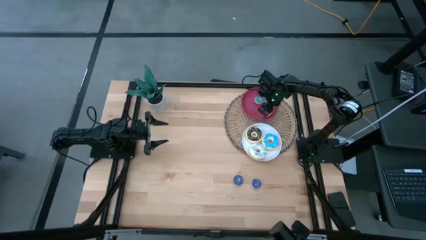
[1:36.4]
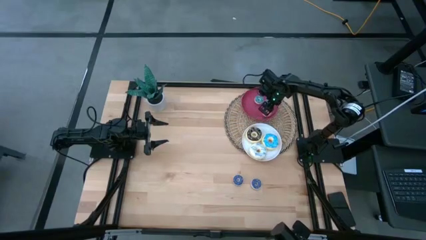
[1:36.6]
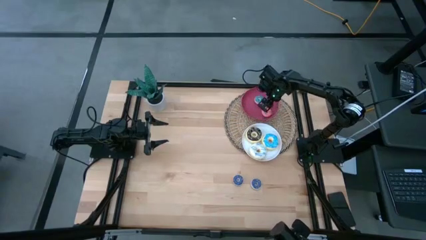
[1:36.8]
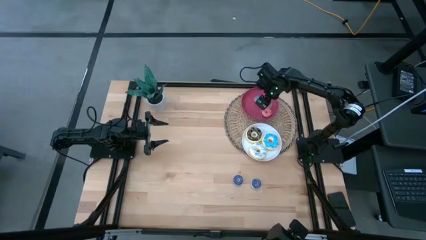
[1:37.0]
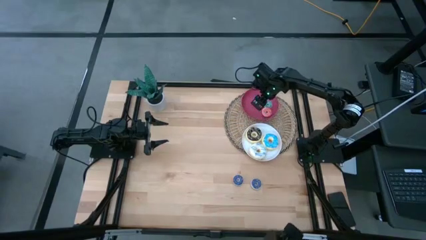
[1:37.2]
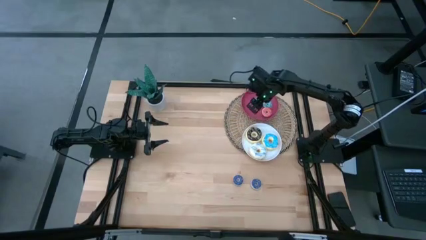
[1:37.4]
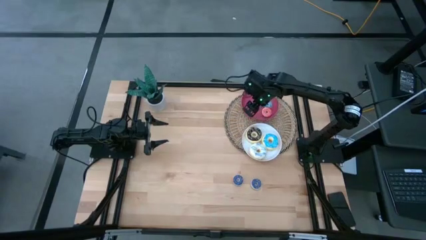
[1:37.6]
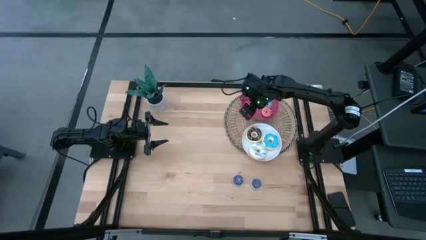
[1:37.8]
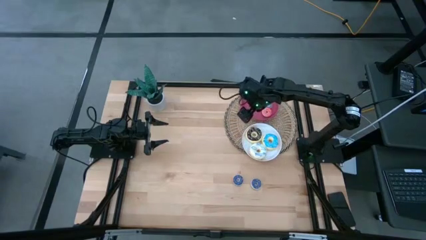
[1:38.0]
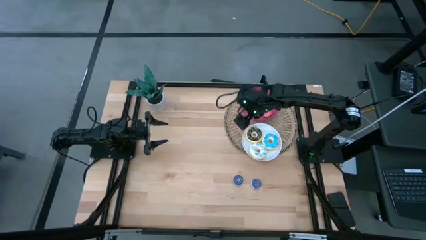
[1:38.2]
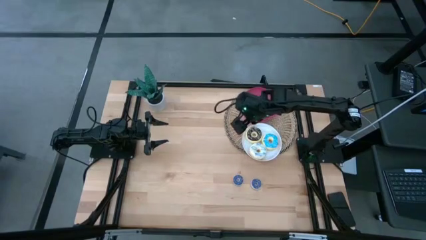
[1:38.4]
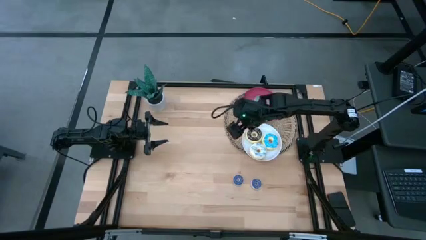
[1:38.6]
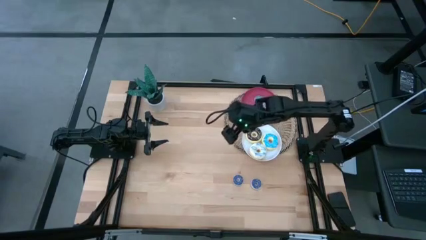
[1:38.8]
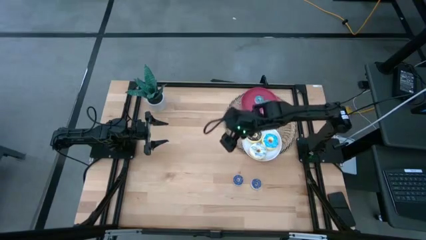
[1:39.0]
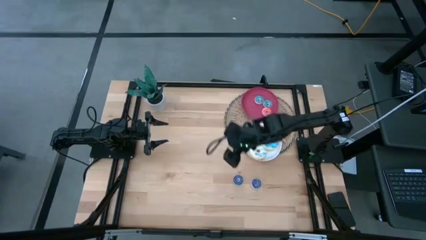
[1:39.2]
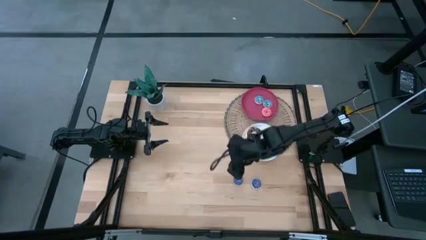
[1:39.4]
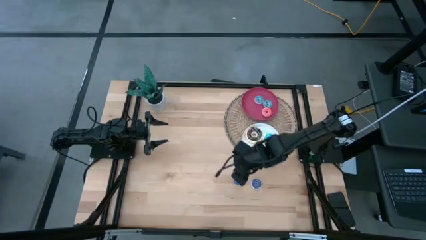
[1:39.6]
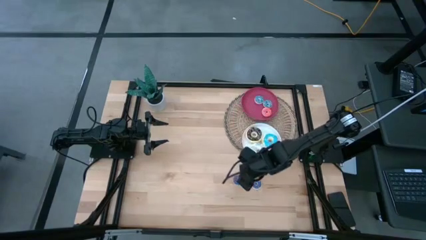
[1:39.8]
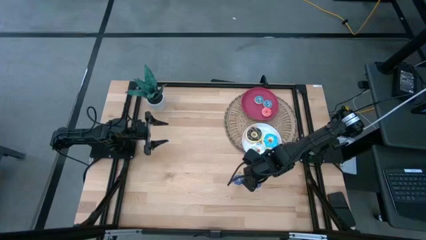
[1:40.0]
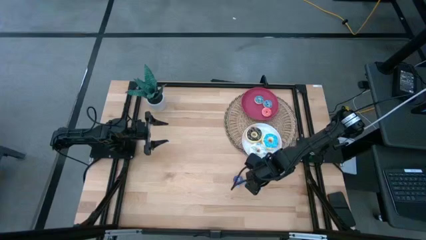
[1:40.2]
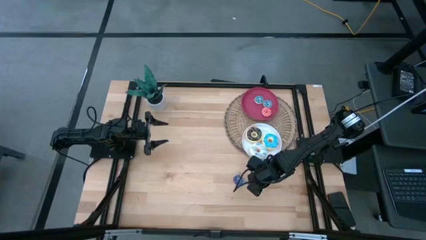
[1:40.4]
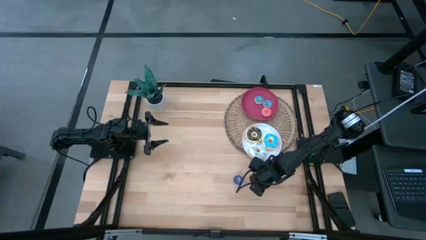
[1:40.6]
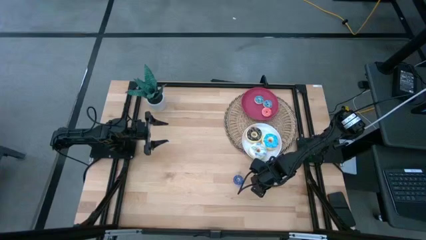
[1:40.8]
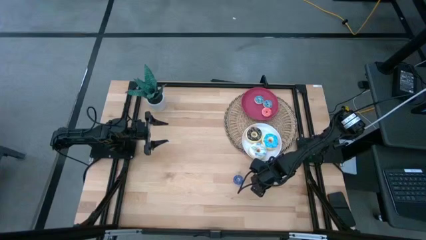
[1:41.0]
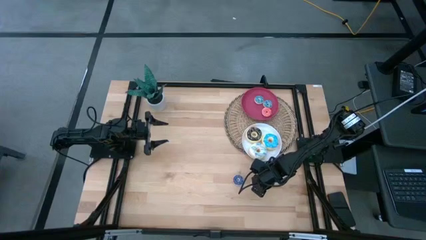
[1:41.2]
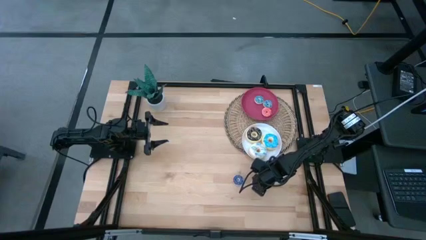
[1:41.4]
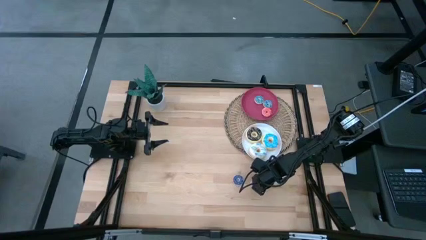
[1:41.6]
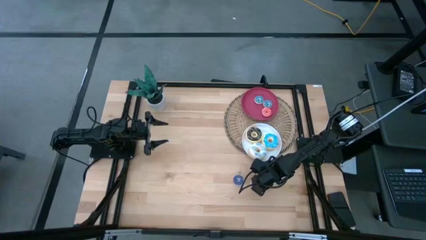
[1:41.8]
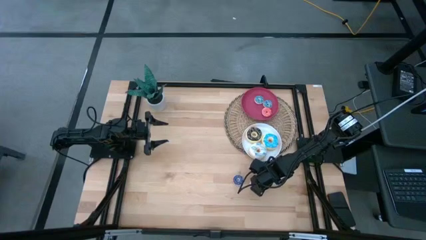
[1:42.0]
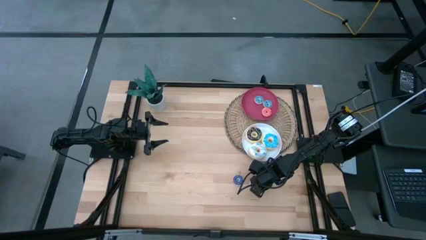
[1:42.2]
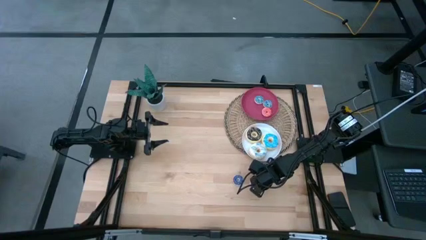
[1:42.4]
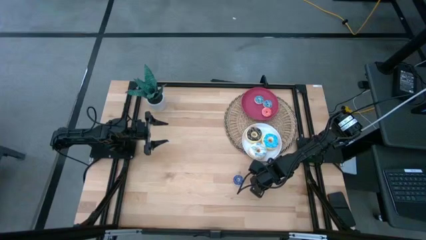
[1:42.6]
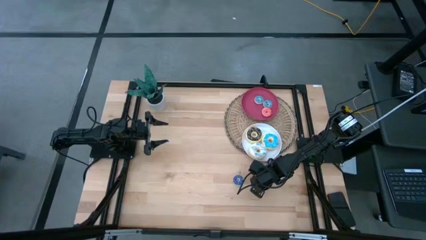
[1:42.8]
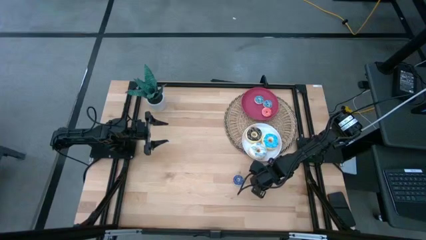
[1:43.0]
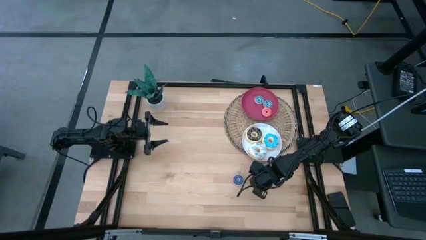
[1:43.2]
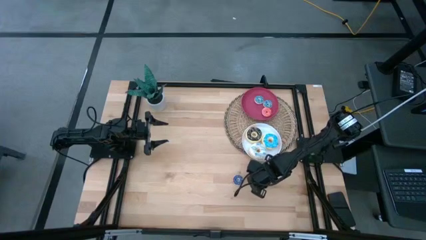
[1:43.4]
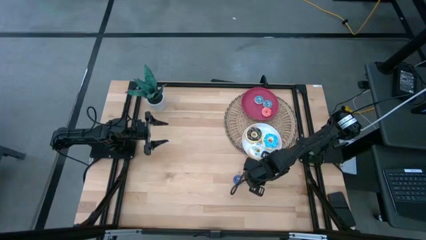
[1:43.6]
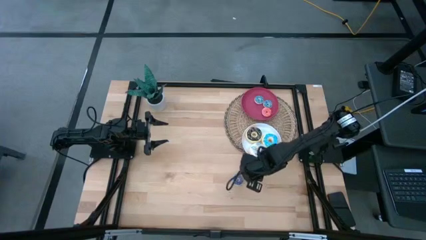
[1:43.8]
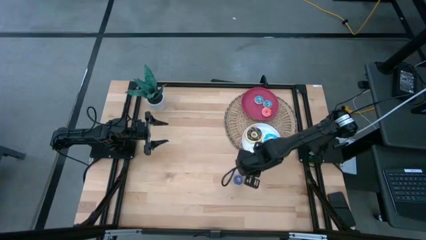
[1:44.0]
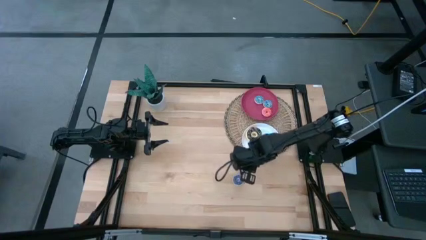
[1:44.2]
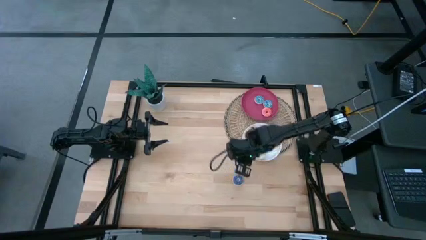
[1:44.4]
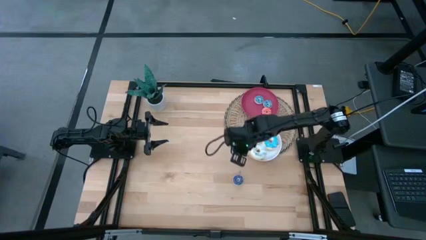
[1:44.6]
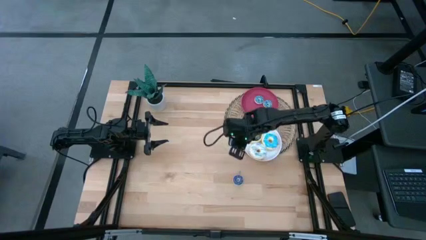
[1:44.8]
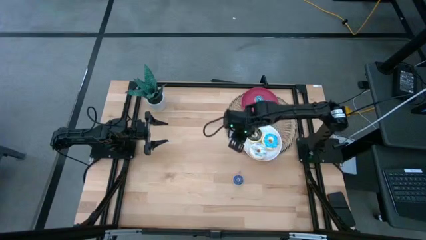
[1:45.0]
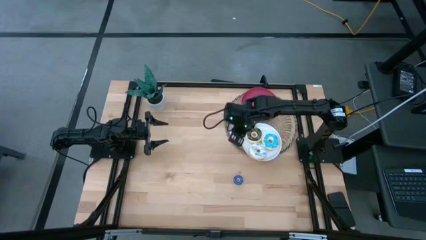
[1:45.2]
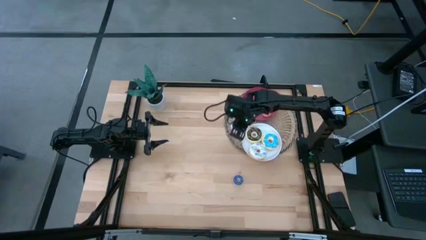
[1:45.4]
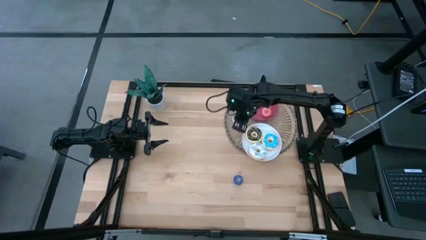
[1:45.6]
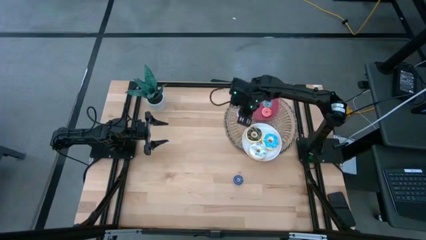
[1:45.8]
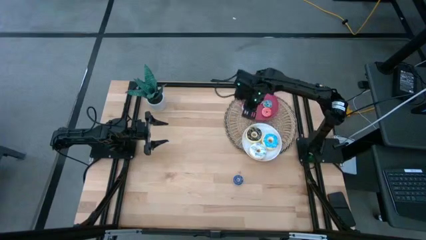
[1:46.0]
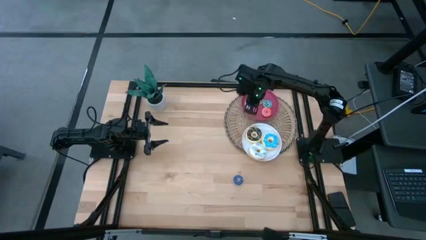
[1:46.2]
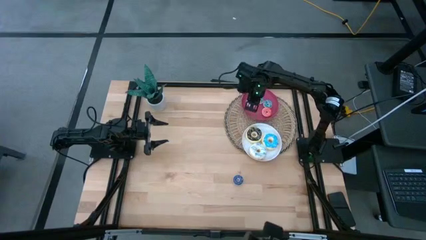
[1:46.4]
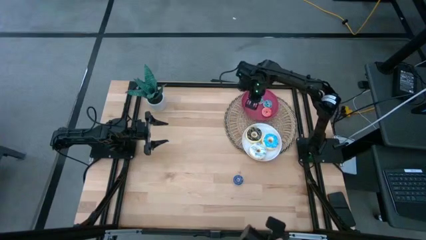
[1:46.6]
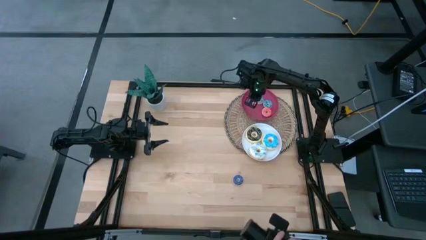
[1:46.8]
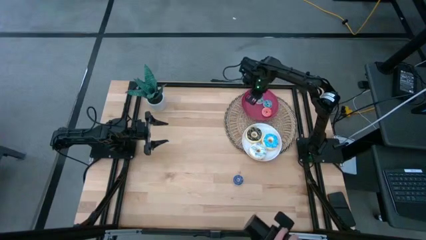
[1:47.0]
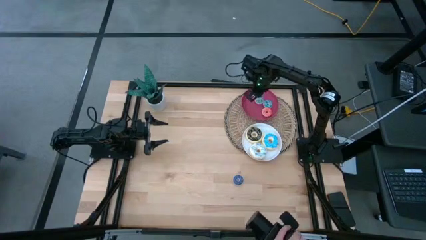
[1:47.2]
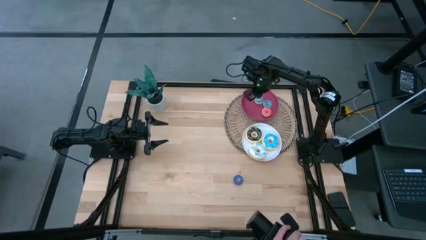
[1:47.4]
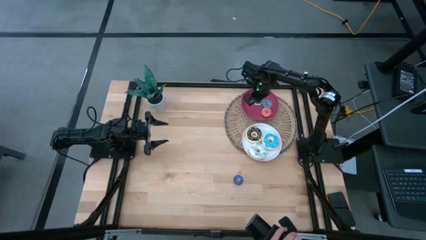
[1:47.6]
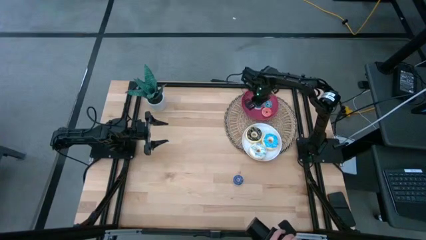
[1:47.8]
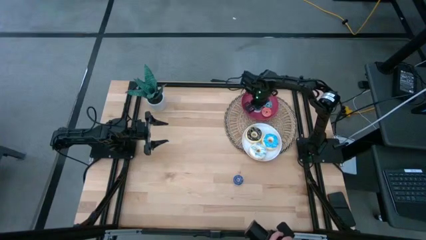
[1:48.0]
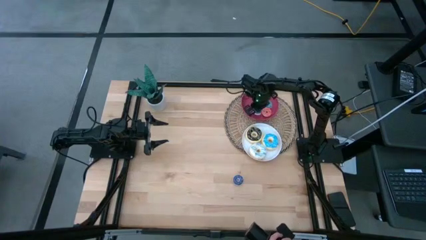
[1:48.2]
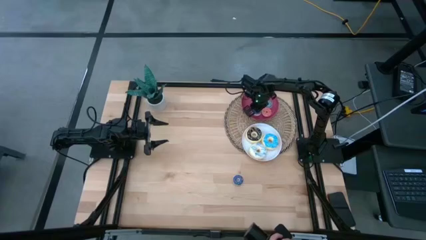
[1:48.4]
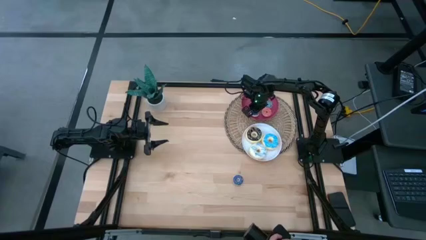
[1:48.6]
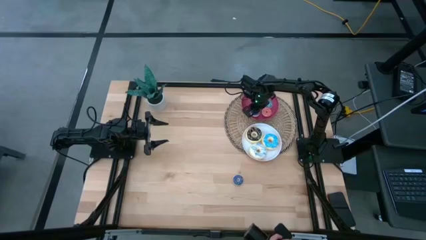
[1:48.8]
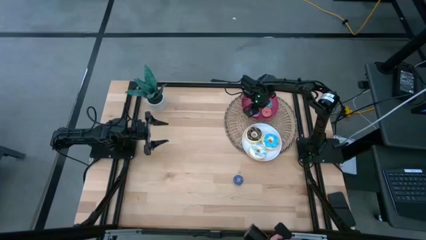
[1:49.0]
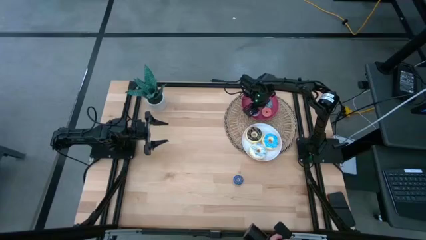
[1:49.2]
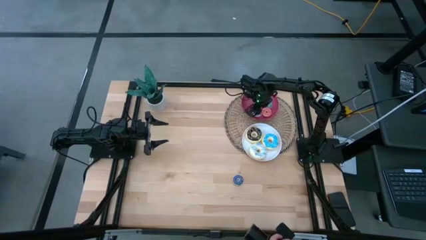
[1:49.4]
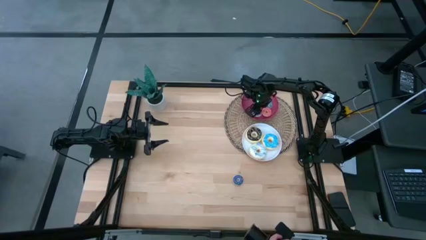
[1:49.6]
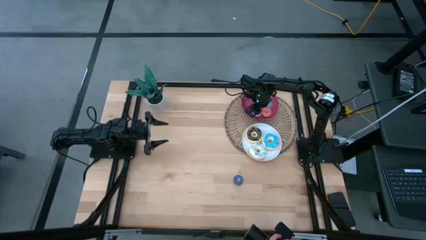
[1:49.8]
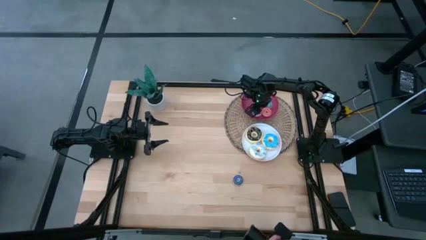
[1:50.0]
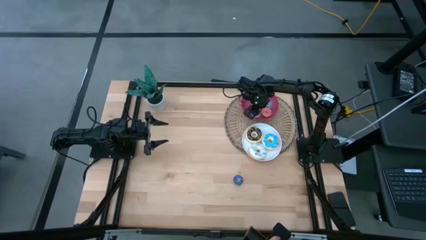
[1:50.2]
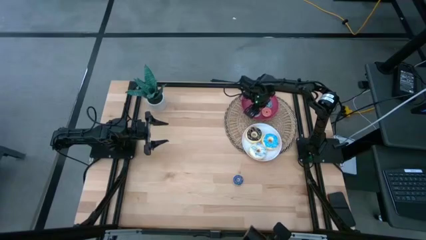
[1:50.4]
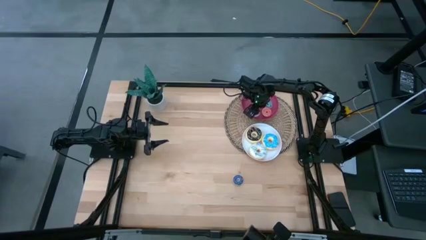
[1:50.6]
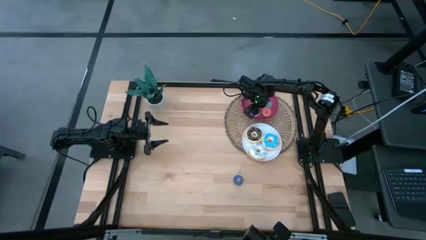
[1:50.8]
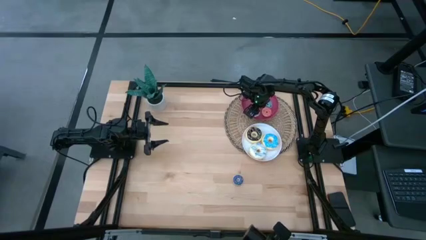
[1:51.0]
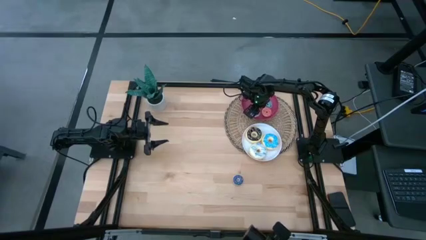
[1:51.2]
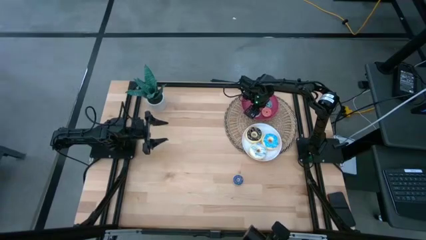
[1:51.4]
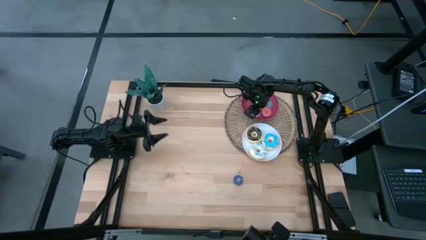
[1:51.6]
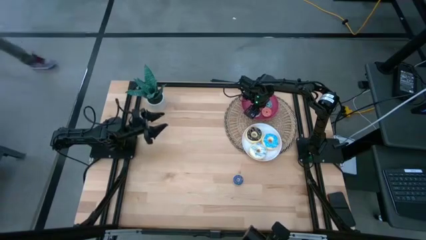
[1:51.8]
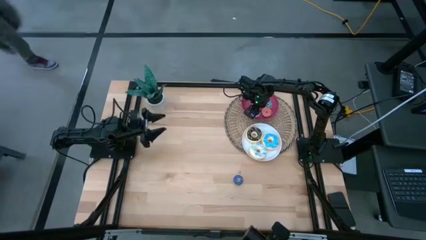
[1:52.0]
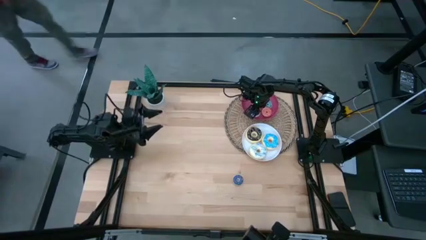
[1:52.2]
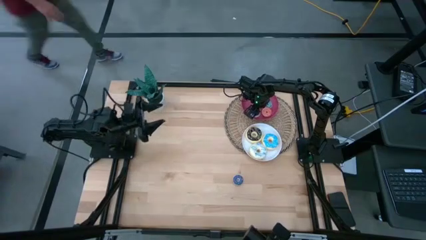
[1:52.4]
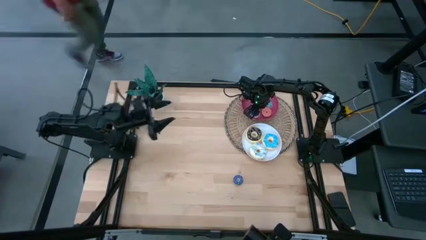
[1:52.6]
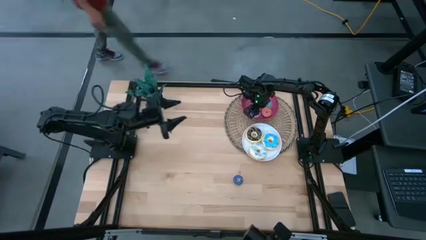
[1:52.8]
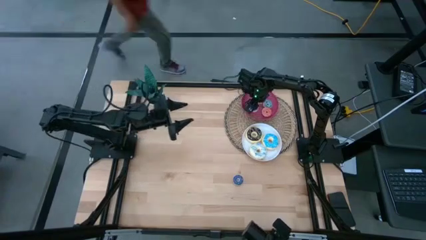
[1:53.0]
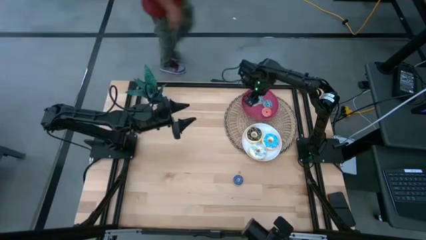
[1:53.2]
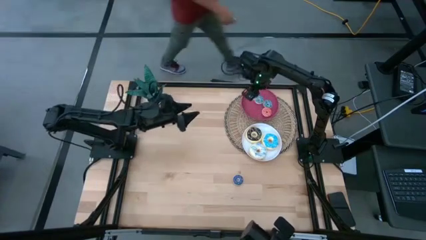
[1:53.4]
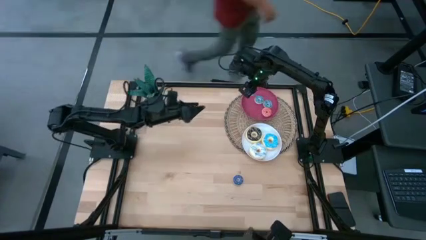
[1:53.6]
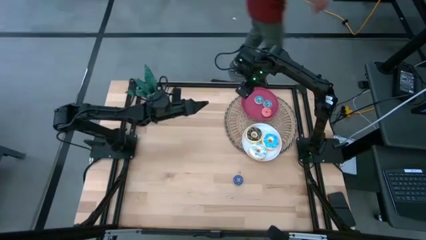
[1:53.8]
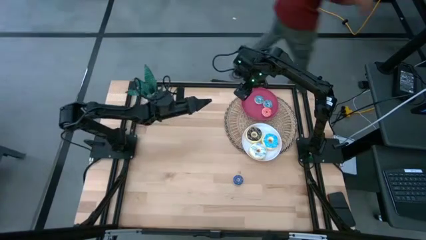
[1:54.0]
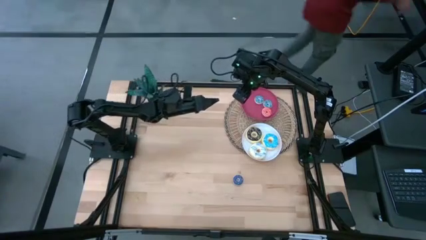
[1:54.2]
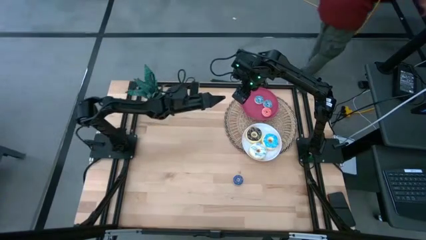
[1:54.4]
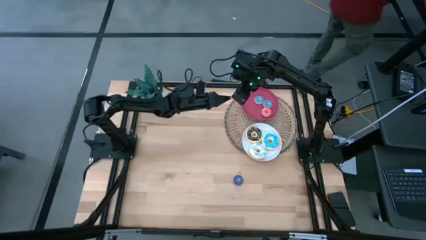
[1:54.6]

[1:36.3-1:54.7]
Task: Pick & Place donuts
Put the right small dark blue donut on the red plate
